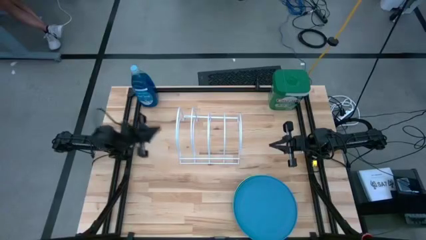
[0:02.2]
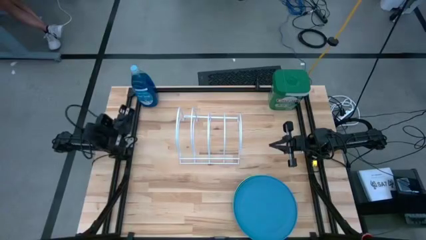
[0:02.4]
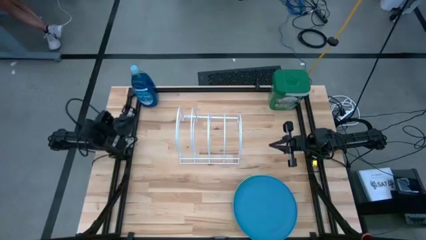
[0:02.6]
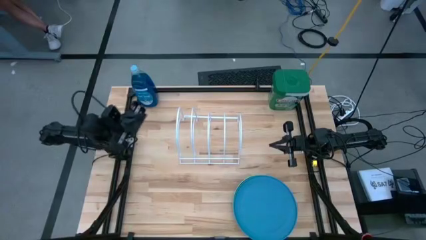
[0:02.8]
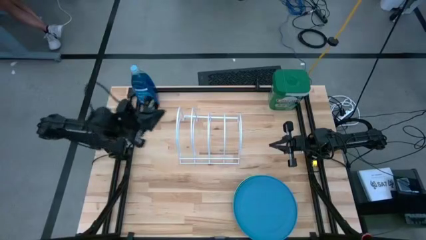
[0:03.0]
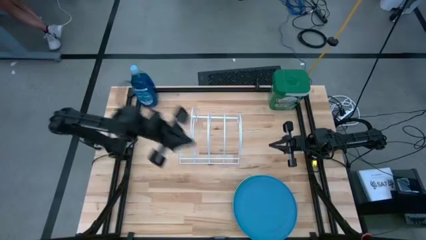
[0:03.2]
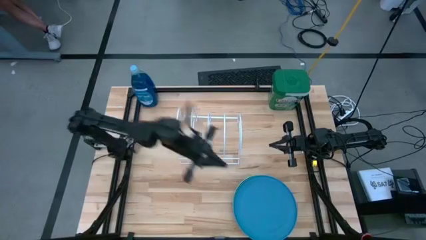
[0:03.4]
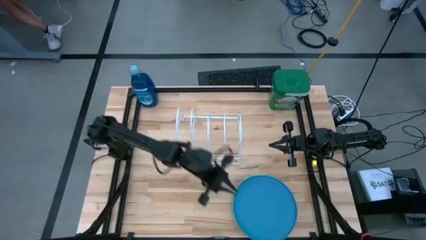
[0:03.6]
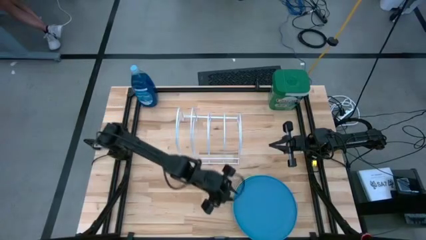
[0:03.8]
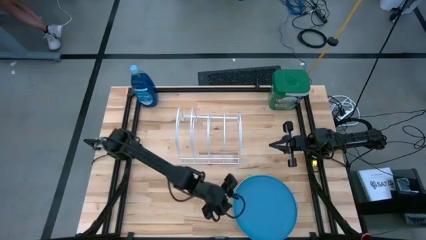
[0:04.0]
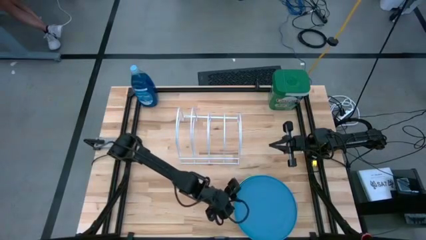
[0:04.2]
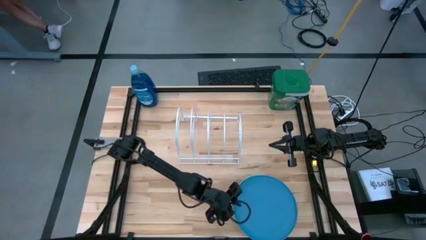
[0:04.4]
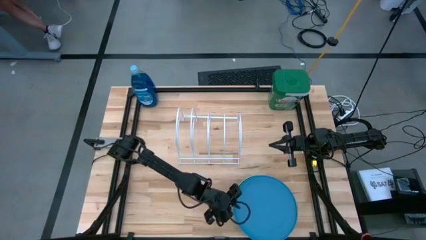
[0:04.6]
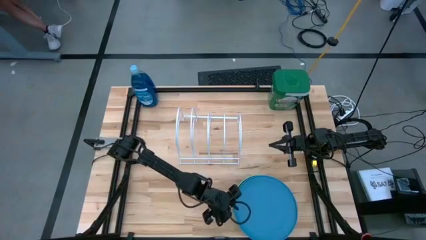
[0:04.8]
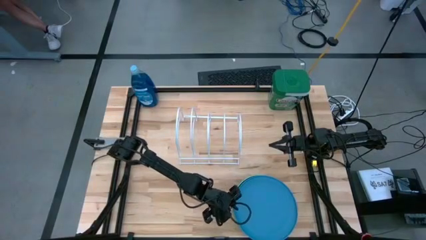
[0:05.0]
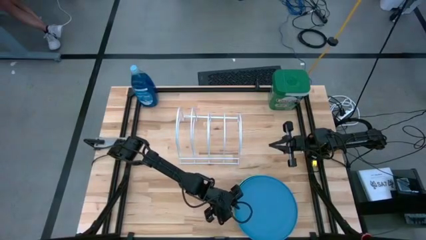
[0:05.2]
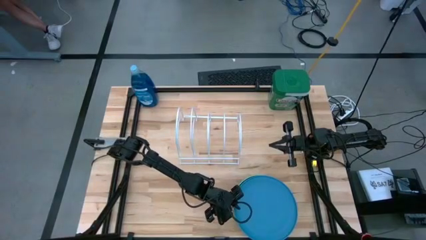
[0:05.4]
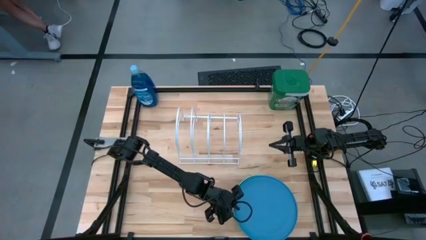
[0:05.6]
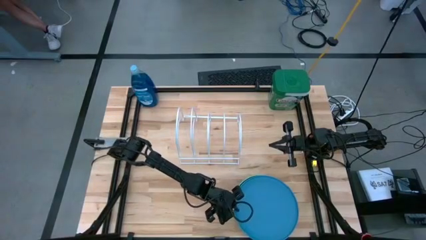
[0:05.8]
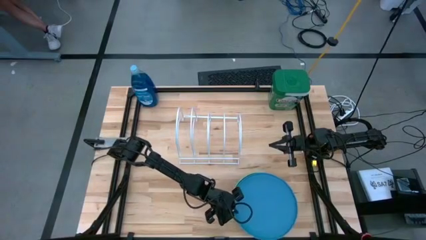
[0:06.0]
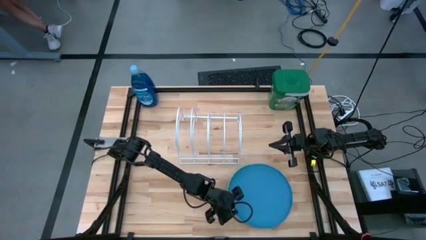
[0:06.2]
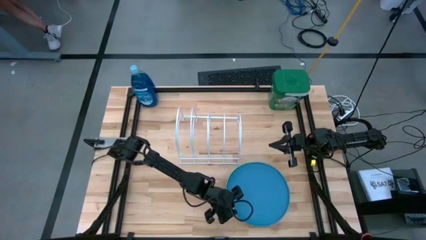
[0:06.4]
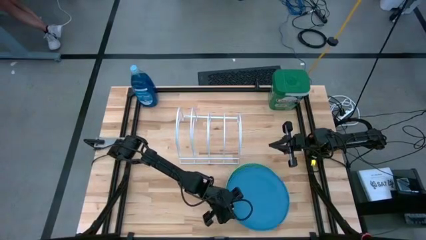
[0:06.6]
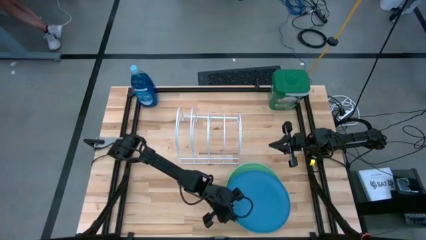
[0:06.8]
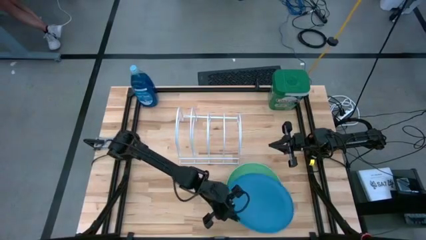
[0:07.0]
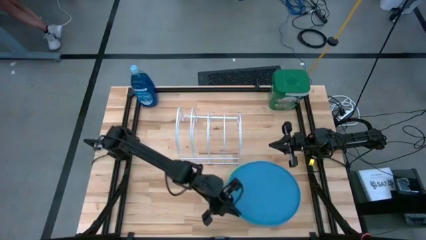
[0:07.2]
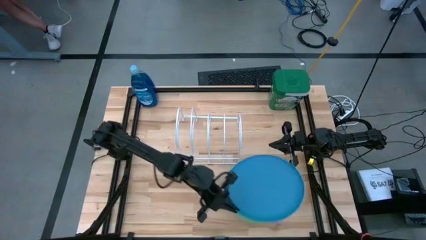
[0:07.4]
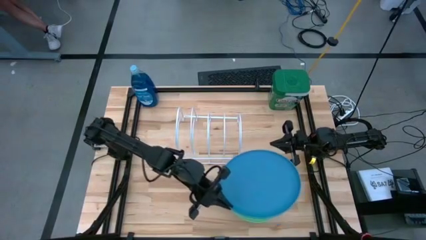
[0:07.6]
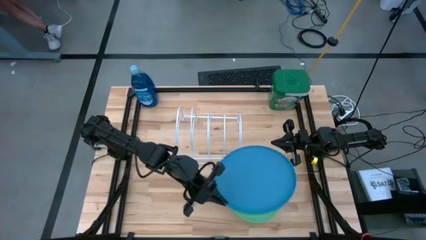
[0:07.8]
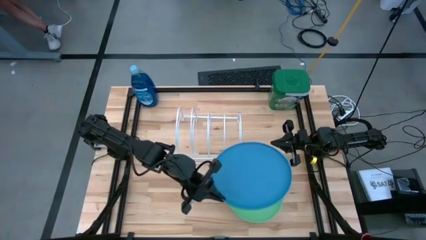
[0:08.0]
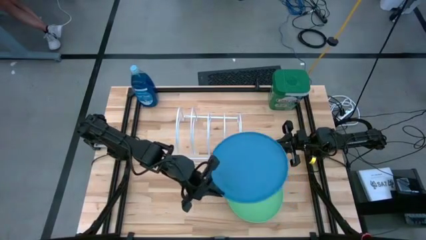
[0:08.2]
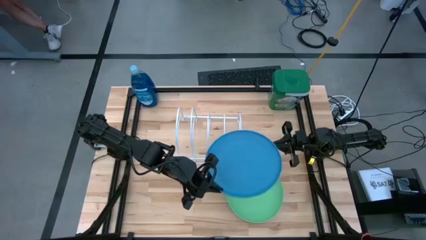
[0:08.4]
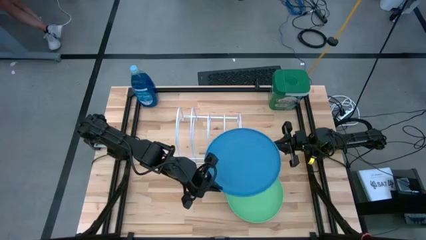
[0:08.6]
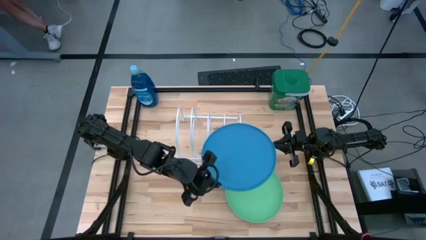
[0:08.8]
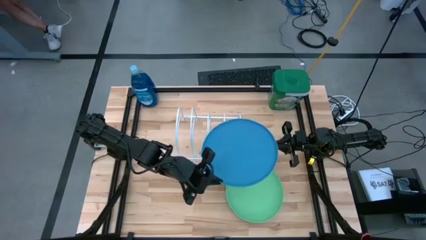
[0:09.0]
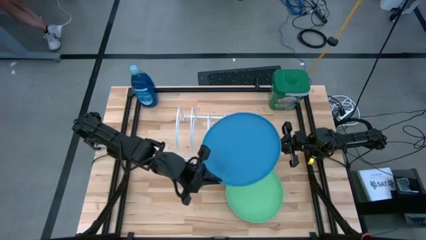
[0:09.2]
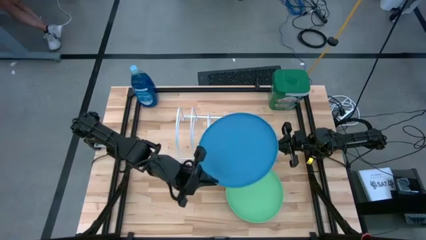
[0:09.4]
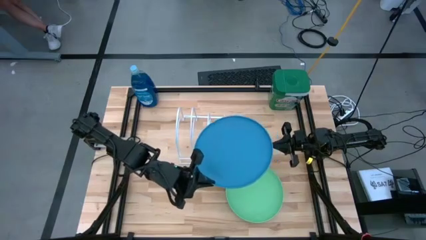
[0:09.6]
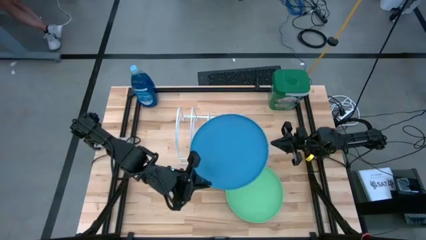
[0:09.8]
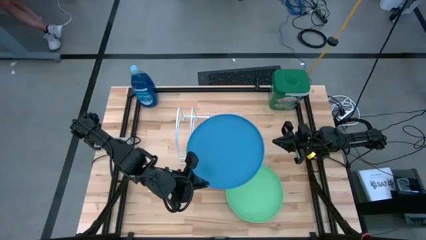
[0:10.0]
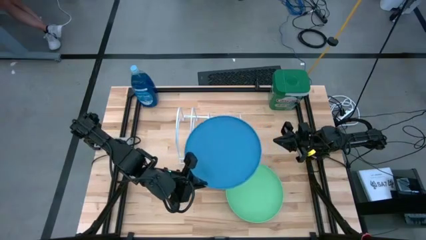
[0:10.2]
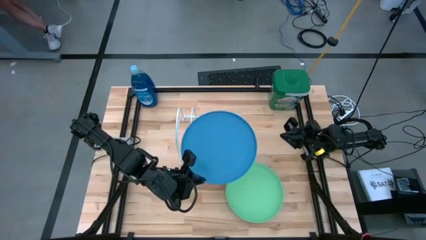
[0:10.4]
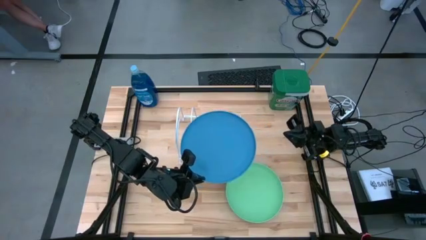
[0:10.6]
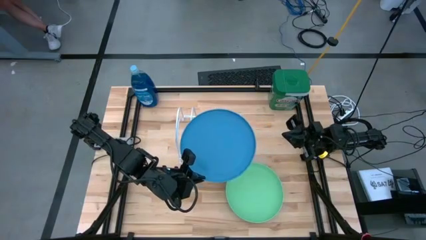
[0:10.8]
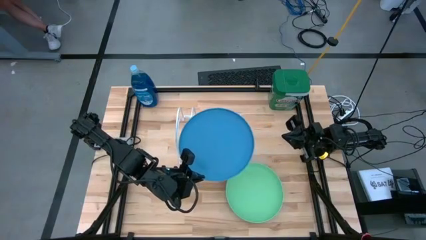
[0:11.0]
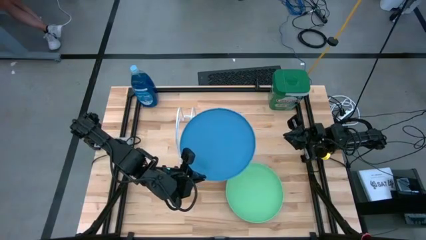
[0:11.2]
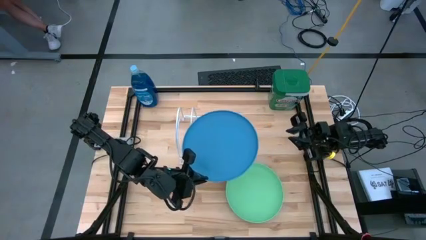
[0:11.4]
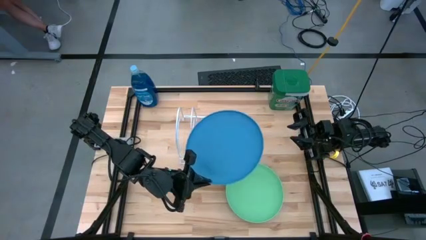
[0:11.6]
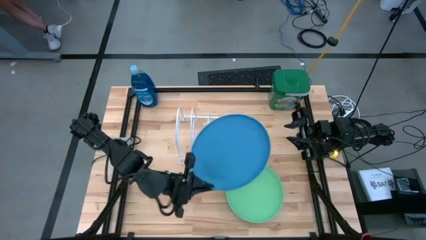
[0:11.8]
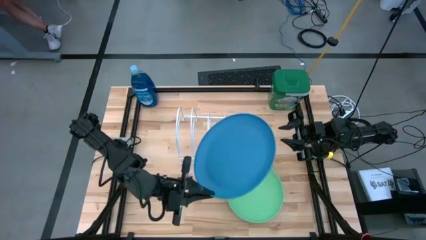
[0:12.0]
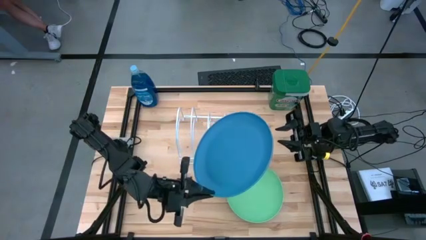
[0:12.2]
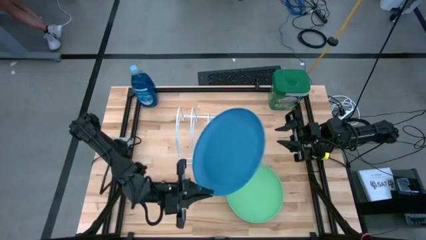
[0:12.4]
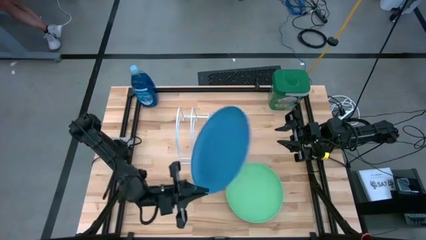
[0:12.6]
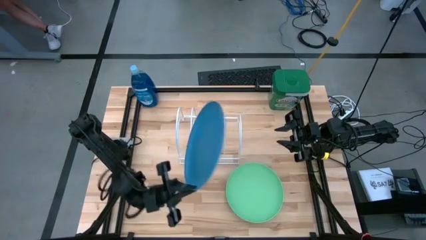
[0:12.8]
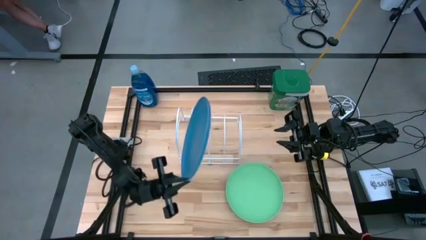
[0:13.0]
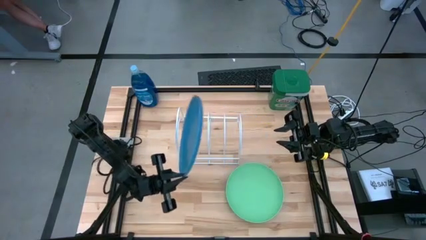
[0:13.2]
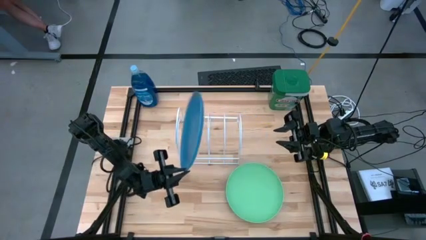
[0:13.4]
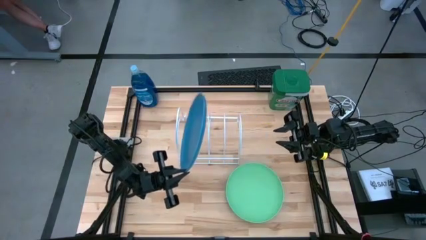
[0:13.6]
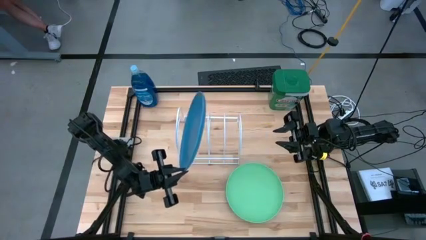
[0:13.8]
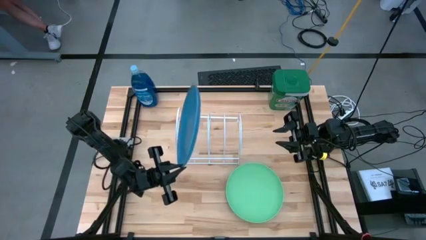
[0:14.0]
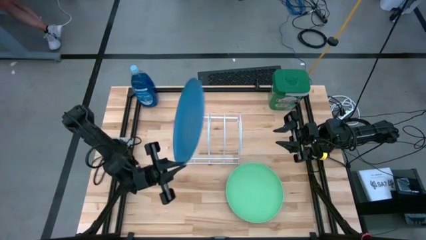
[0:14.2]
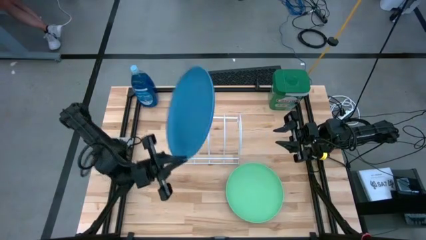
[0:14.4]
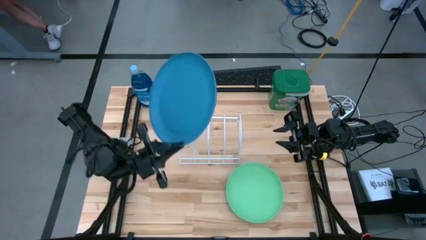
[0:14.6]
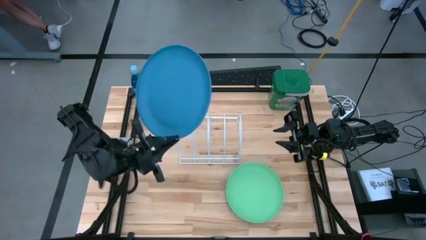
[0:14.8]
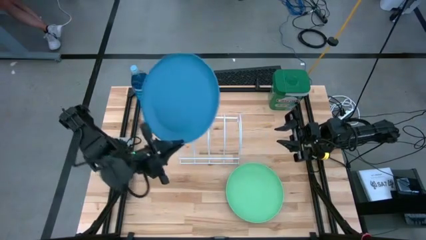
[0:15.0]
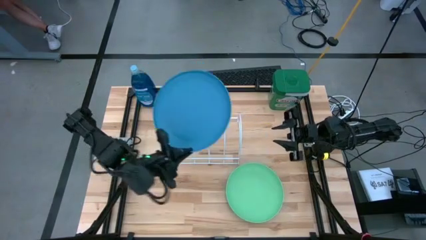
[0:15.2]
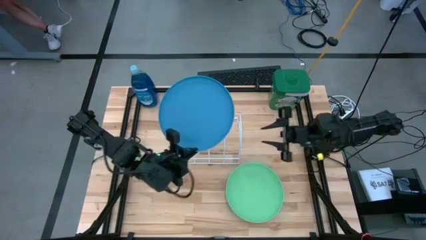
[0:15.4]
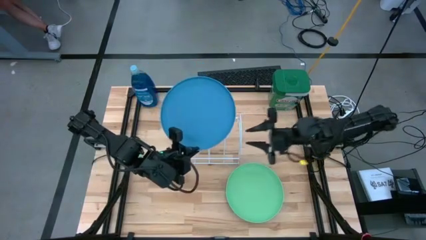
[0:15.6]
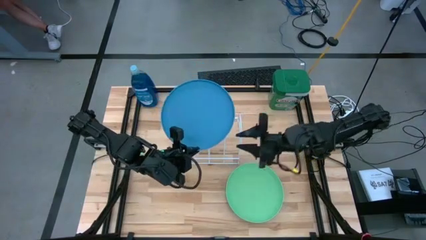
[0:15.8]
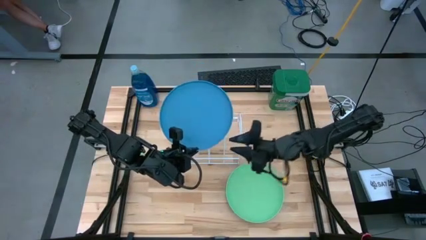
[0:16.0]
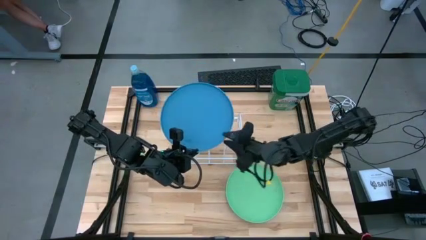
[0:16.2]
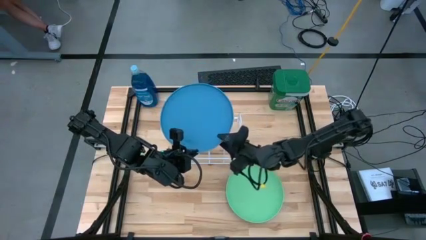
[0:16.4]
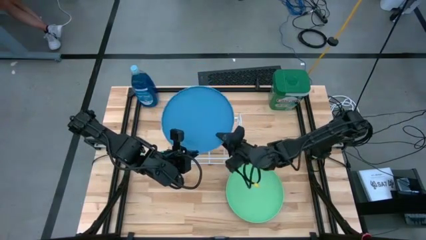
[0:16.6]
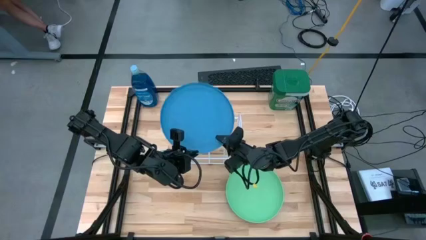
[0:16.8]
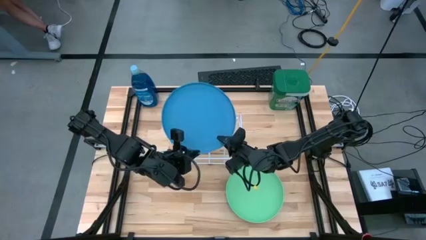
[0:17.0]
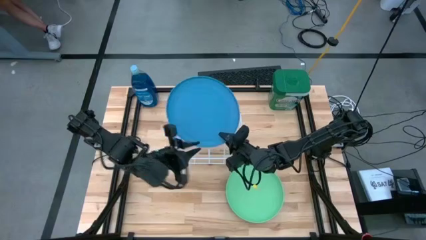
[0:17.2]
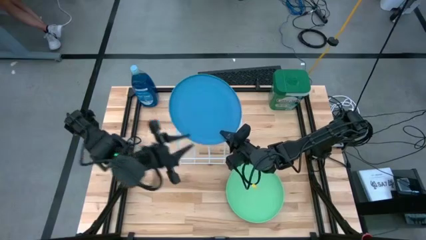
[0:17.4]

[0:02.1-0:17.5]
Task: Sort dishes
Put the blue plate in the dish rack
